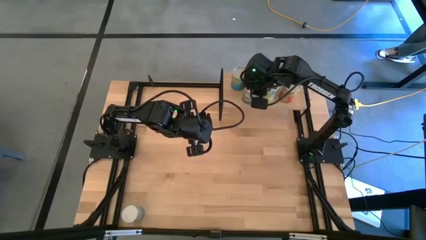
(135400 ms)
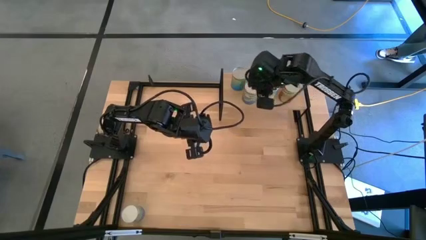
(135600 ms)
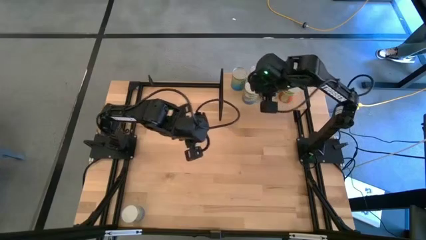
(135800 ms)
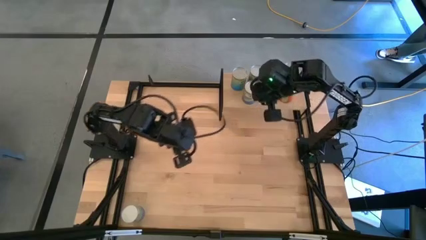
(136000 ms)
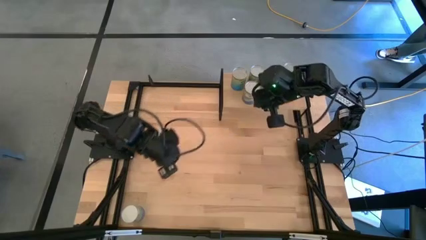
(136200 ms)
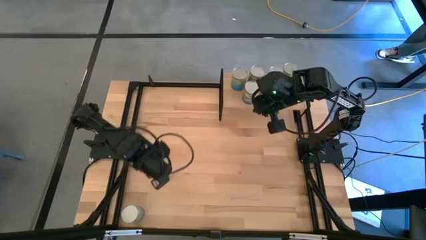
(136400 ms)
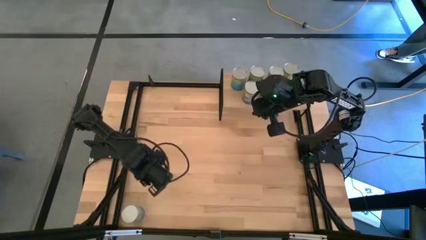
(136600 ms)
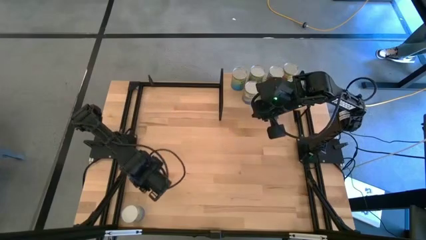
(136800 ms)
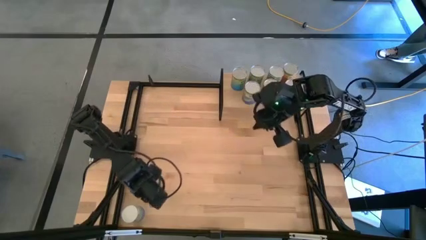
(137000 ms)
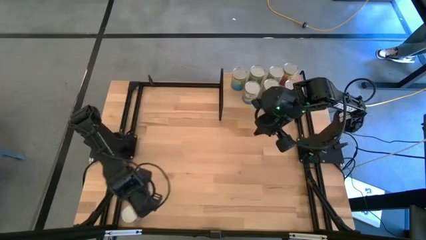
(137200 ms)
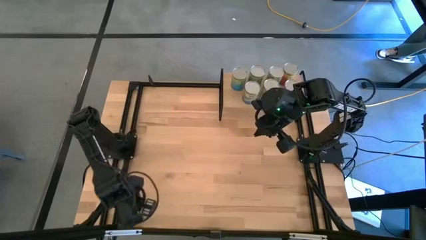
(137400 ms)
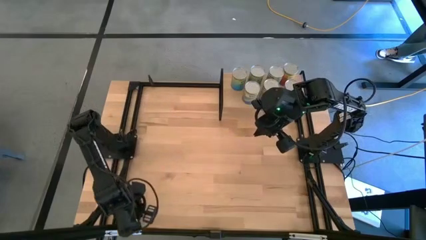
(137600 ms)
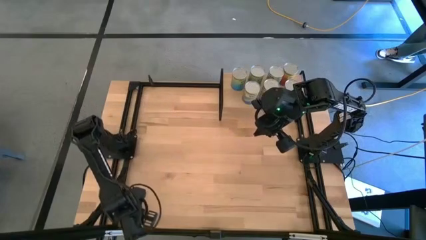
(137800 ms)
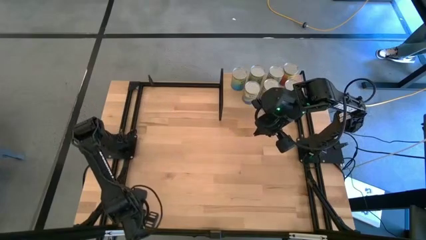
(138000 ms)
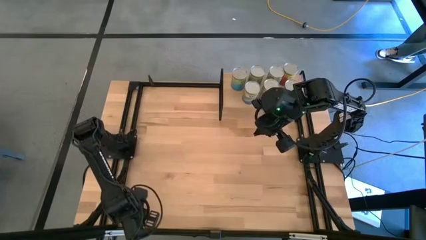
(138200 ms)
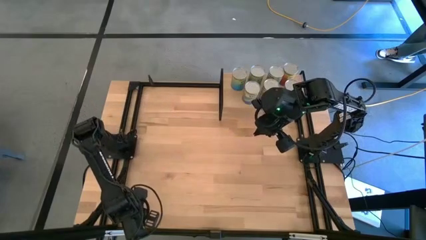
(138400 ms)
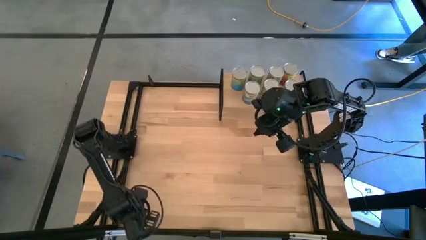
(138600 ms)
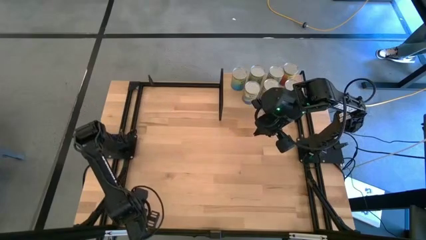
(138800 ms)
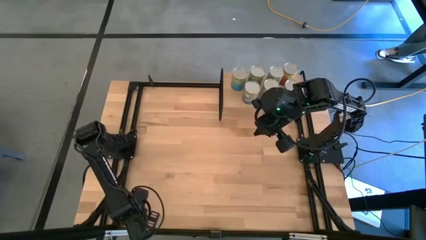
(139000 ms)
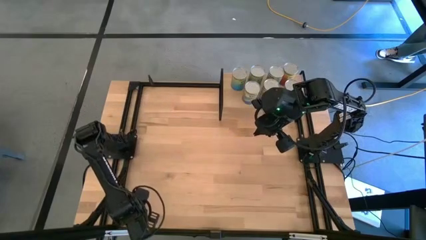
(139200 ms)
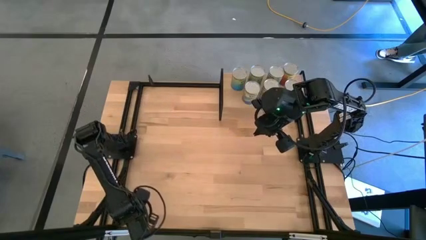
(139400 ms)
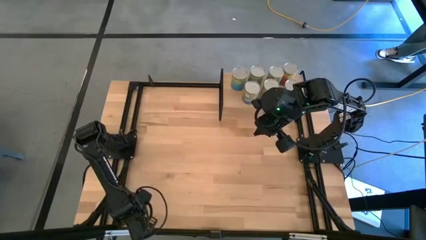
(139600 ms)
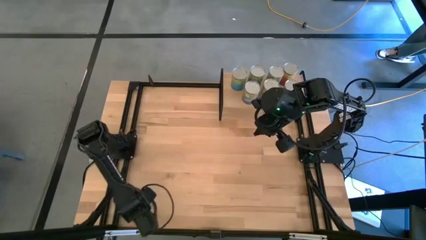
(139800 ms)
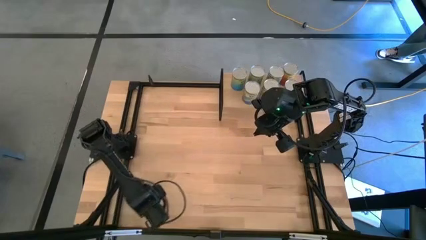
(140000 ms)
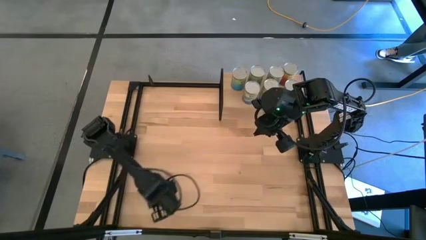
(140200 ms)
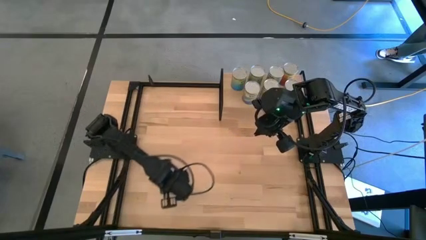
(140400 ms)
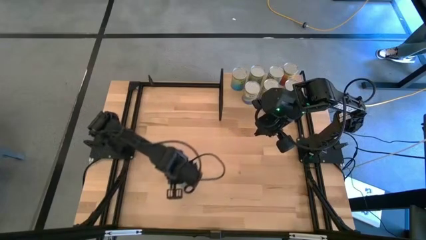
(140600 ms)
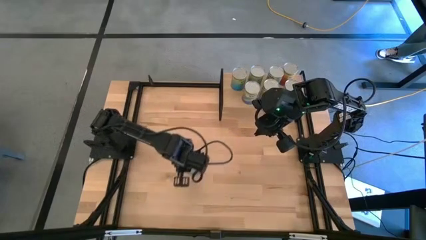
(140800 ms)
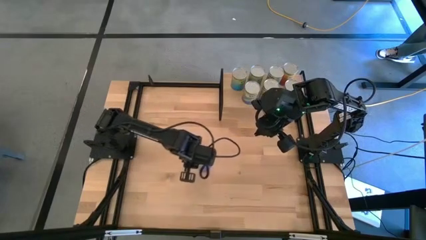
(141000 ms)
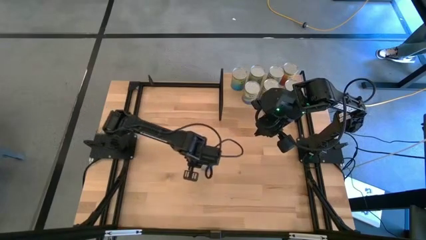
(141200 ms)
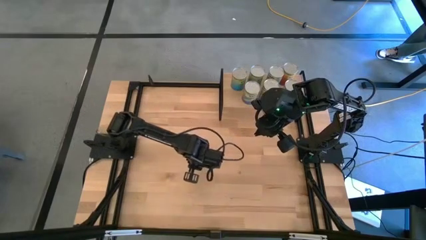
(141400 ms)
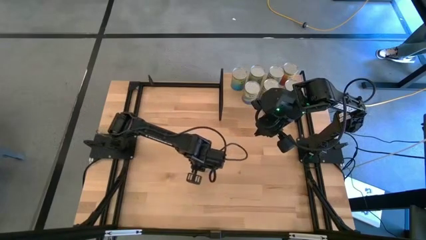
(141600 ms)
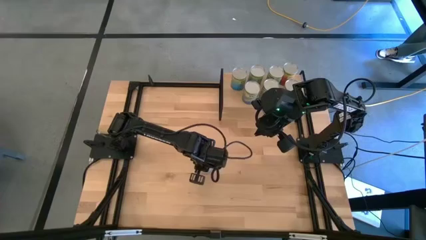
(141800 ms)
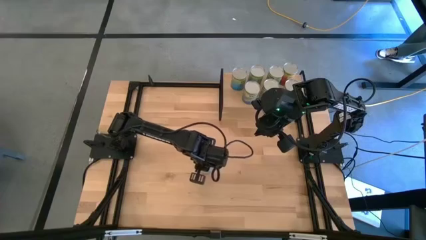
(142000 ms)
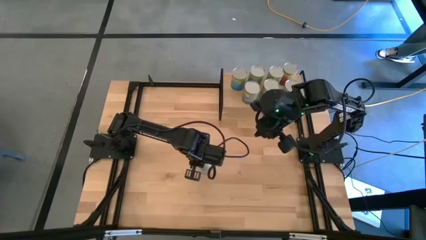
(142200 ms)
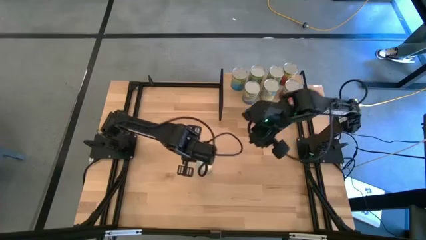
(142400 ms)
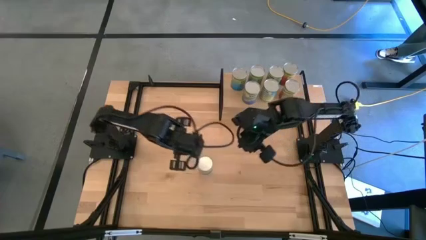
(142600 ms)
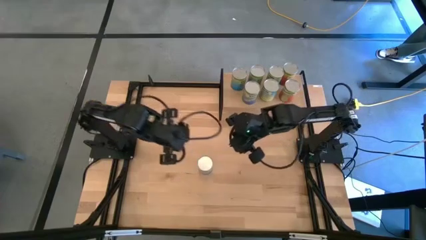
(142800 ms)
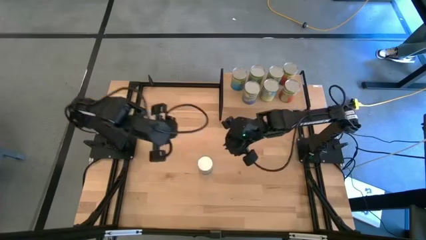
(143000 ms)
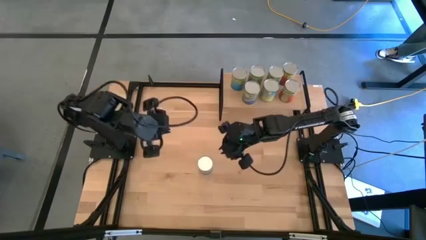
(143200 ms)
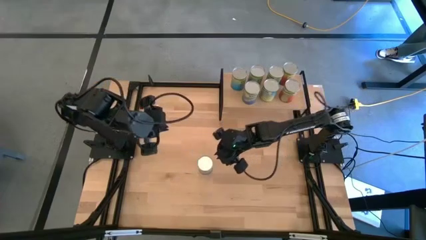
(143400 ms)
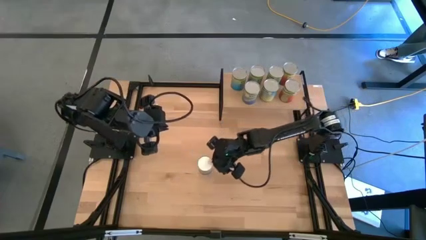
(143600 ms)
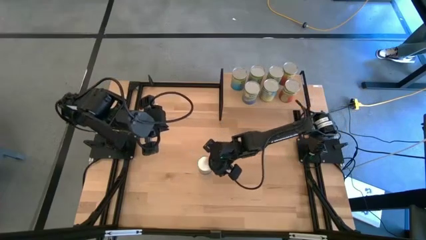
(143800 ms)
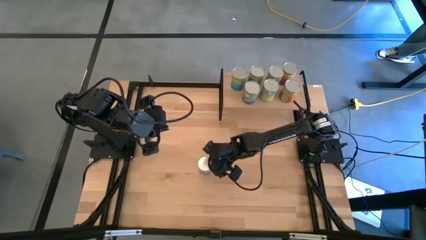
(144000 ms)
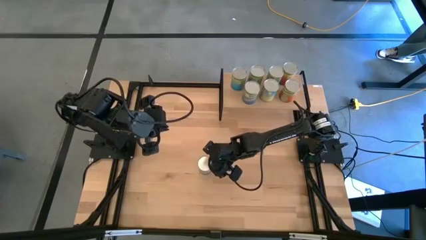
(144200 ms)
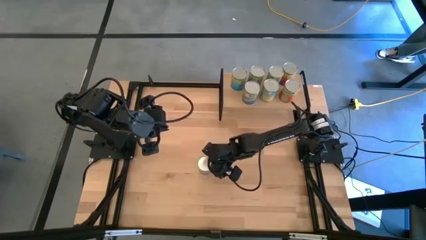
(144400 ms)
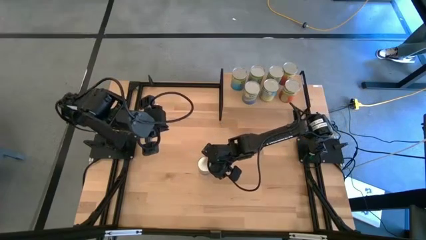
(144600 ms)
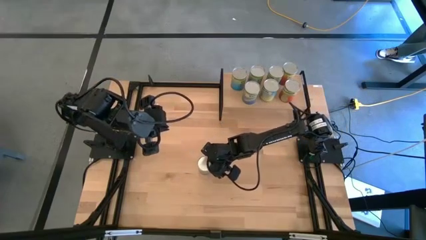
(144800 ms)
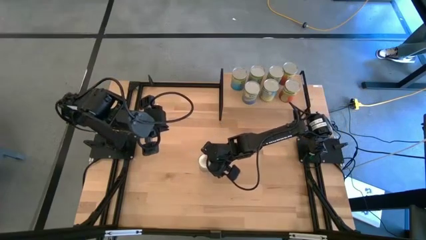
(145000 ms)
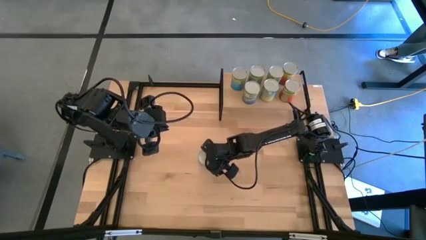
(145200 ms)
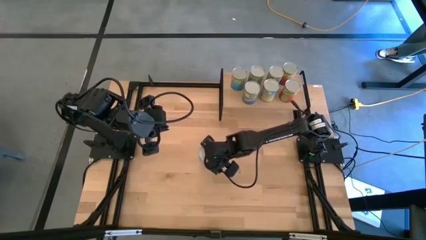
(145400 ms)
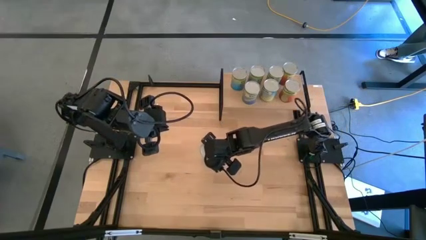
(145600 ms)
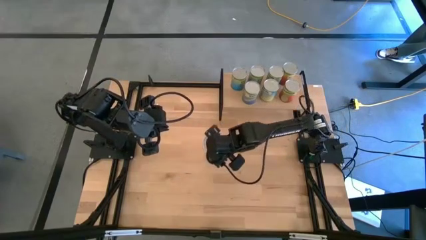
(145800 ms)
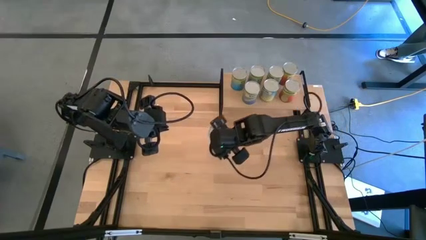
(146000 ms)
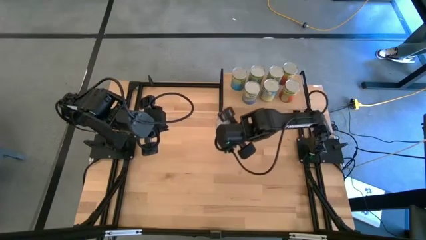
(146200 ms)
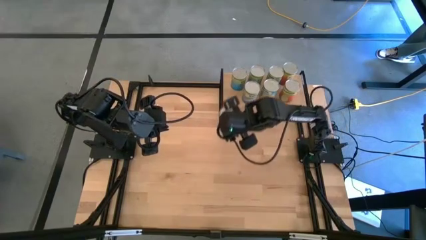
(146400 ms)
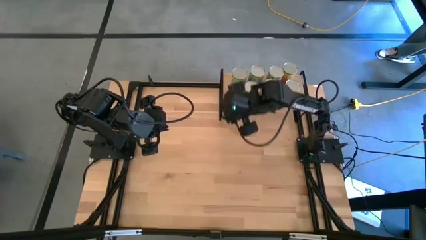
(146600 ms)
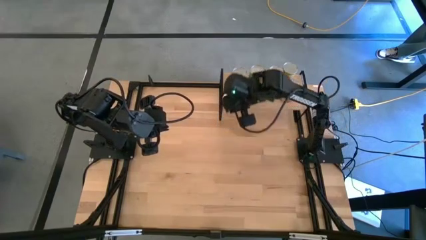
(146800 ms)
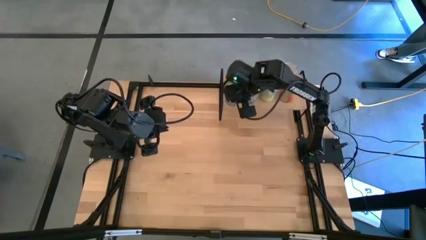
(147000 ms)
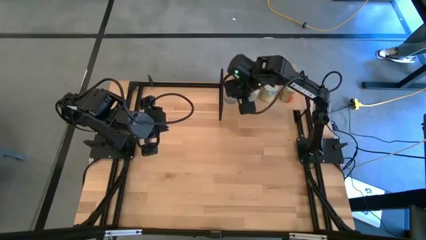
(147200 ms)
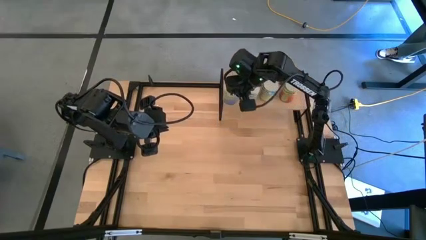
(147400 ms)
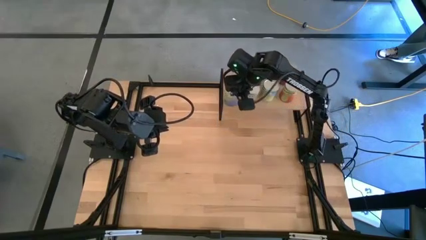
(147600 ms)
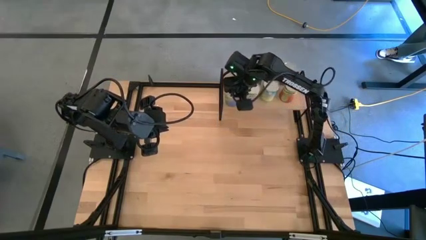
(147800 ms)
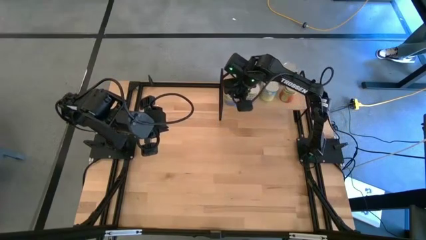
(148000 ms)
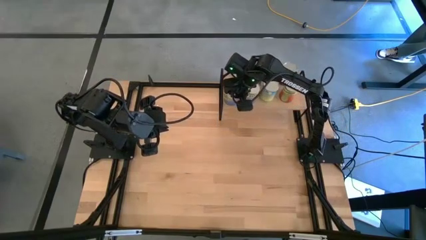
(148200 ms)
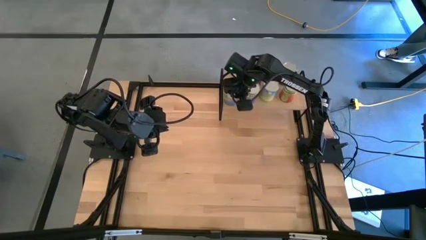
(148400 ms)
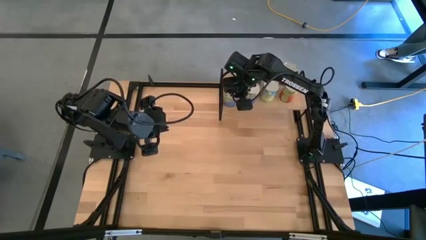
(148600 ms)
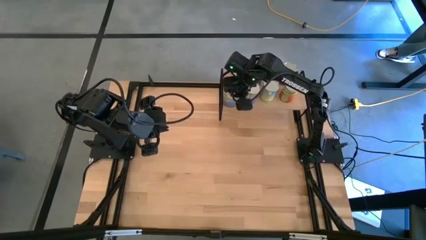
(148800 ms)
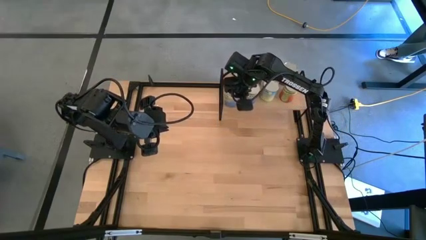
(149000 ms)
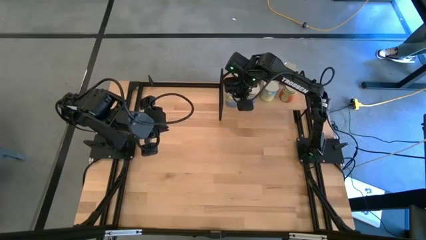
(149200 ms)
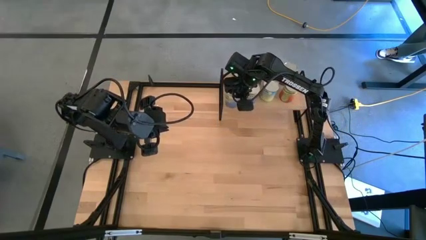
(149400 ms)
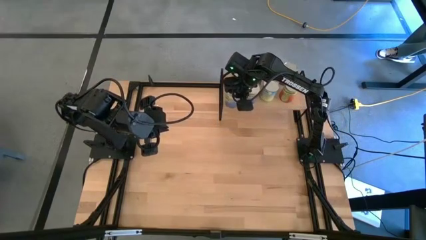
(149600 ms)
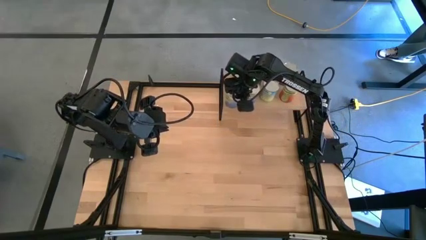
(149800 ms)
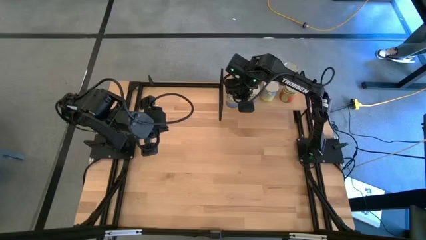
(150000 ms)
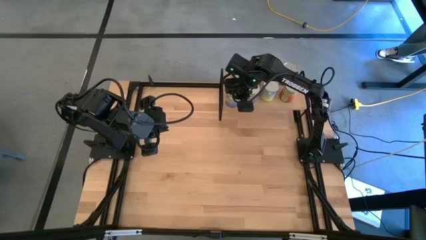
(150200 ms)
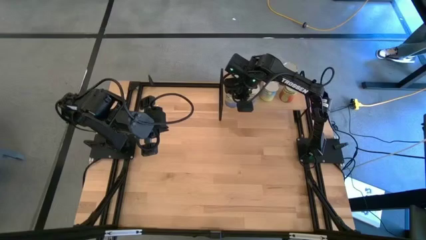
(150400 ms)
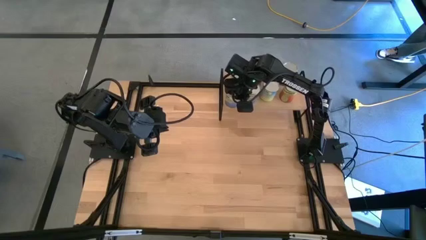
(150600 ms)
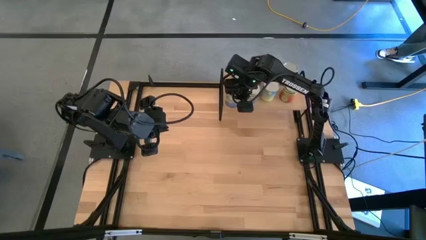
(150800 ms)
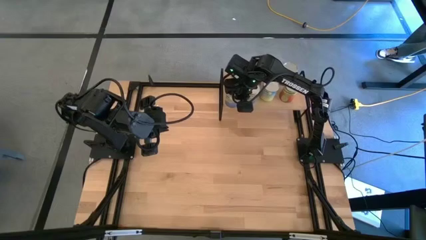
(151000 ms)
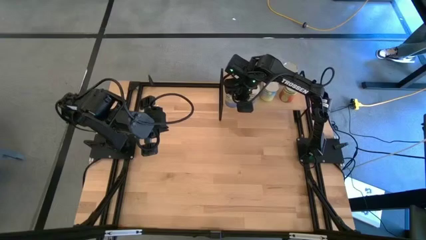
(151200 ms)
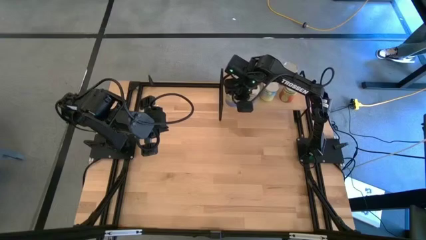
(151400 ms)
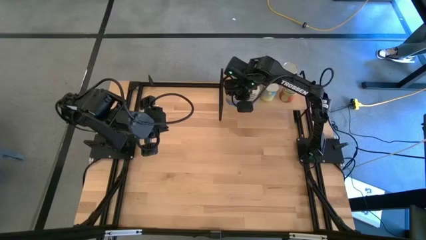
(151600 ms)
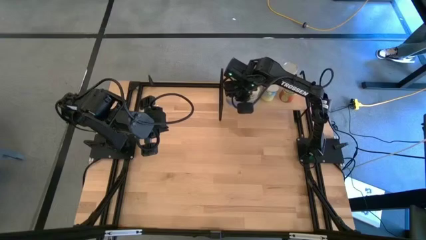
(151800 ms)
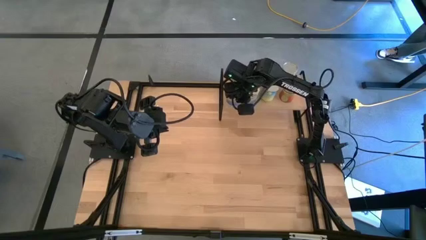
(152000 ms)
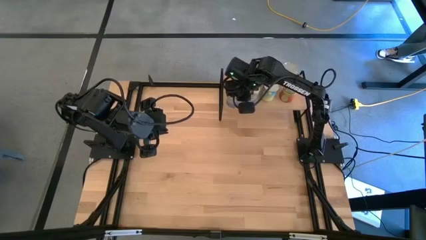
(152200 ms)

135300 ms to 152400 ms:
Task: Pick and place cans onto a shelf
Put the canned peas on the shelf
